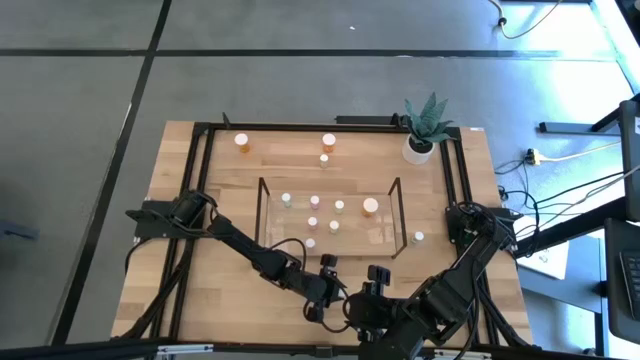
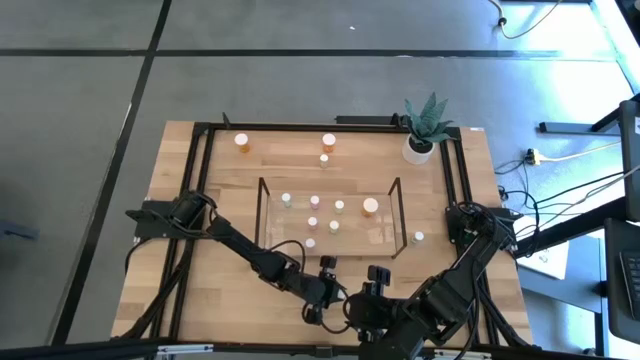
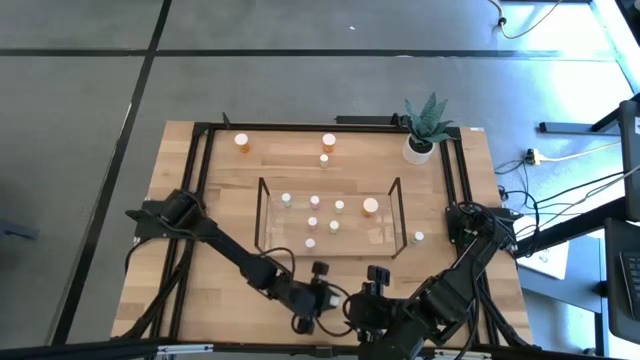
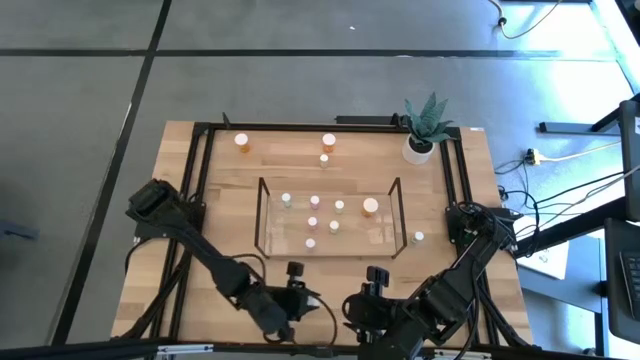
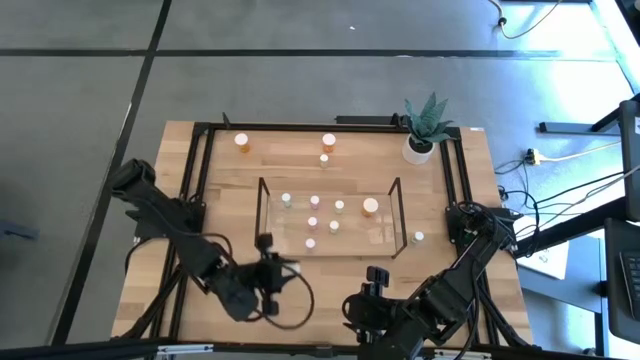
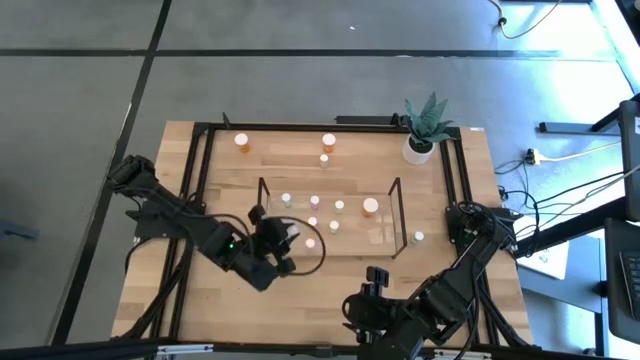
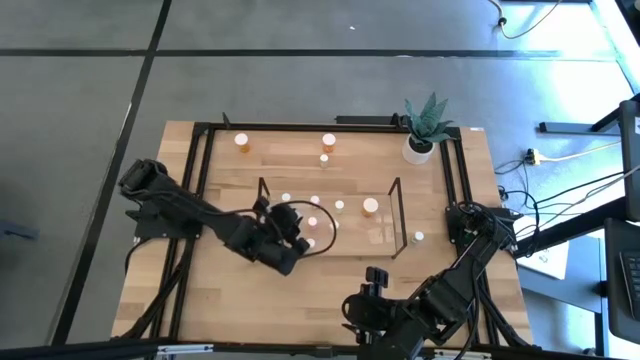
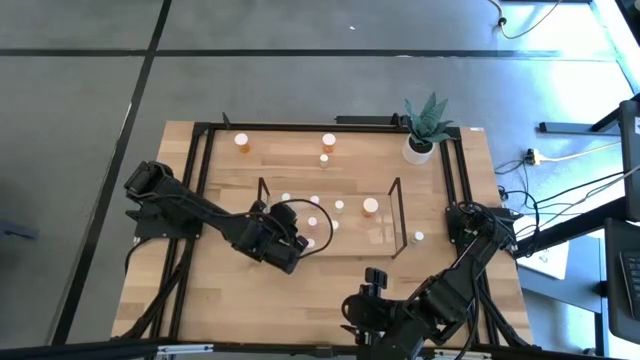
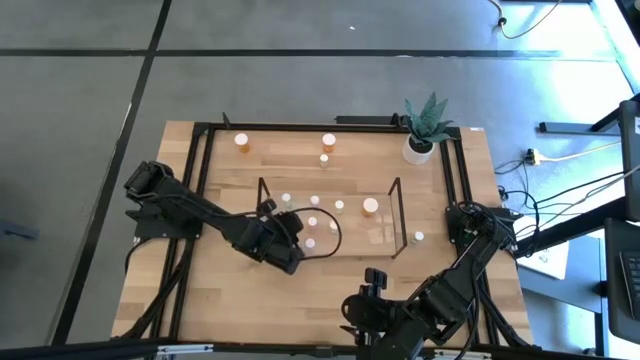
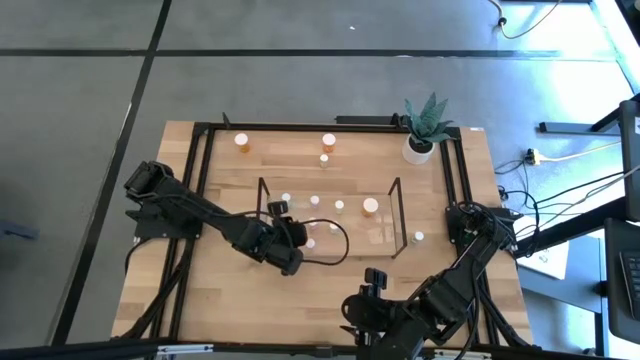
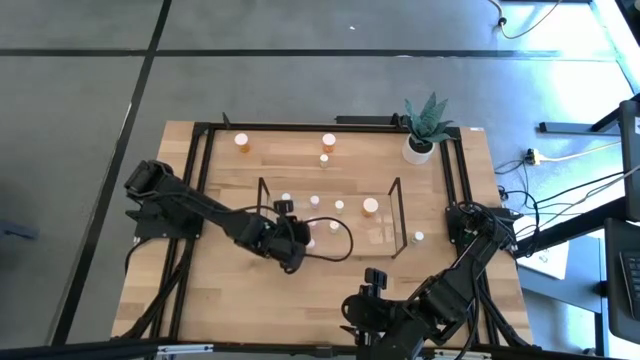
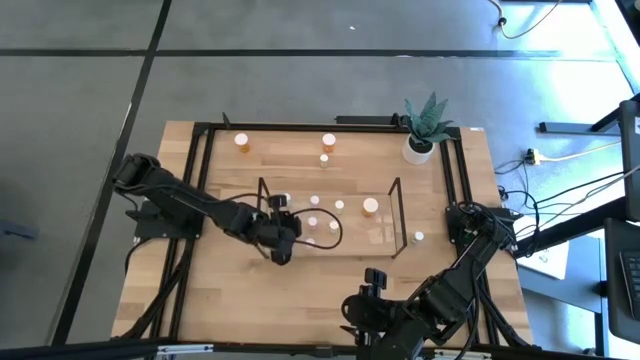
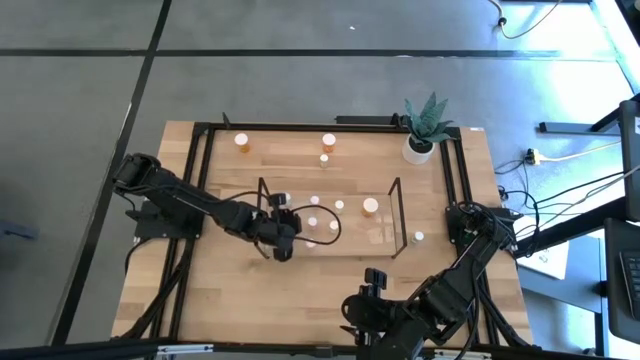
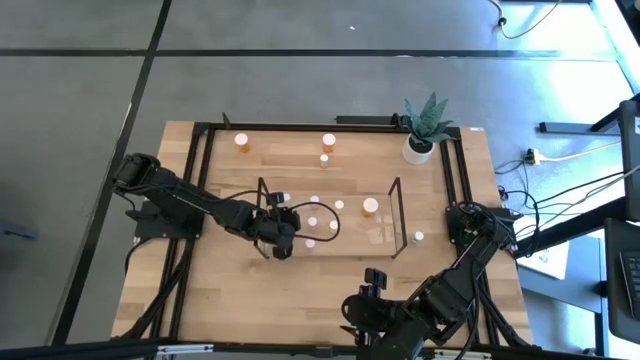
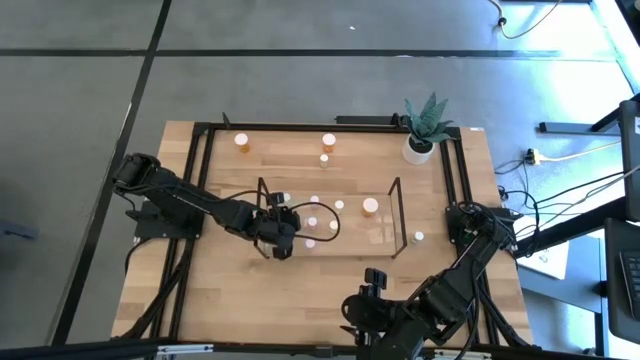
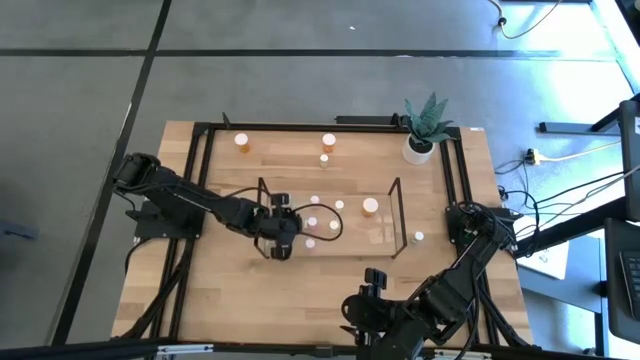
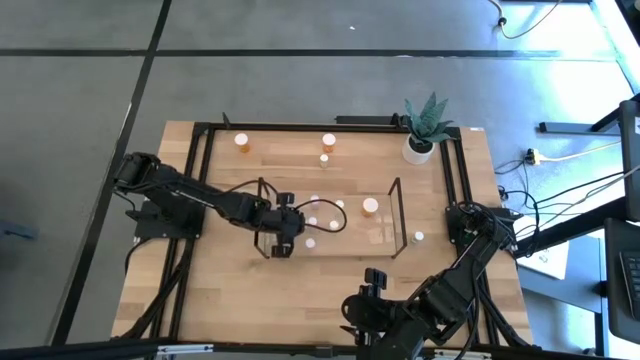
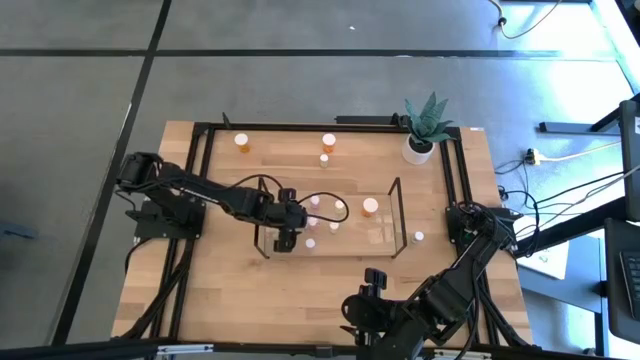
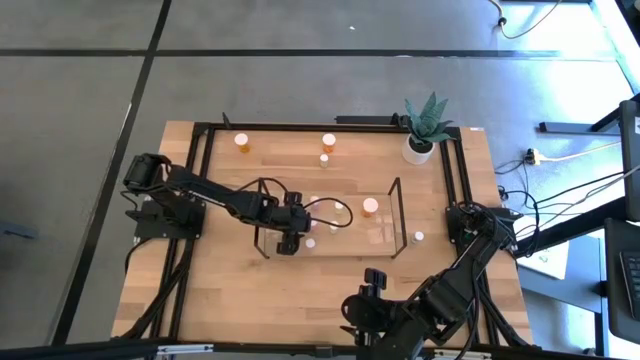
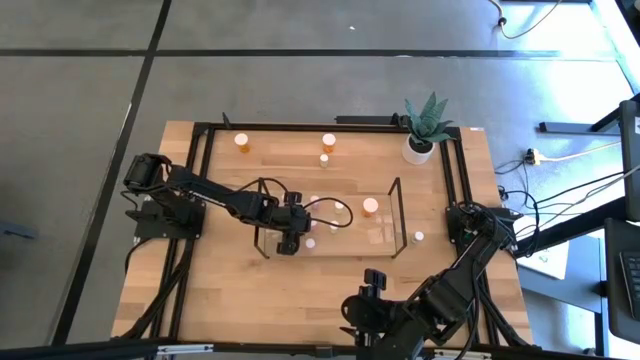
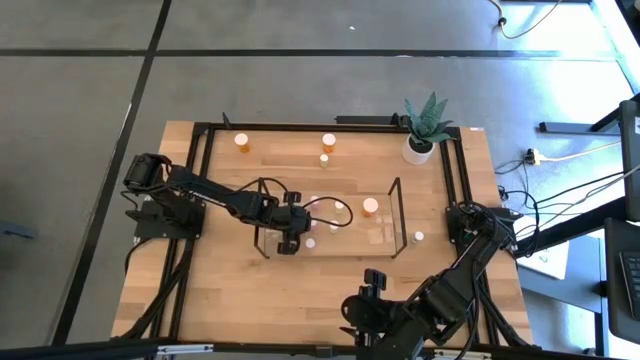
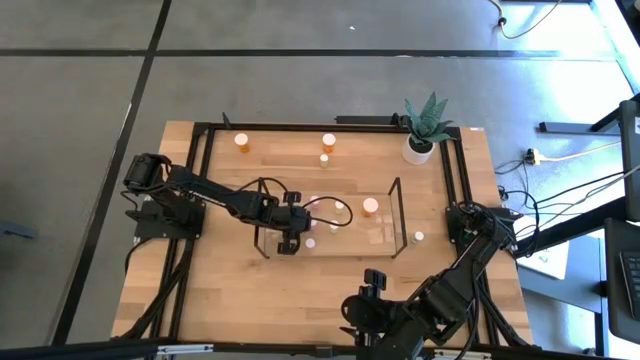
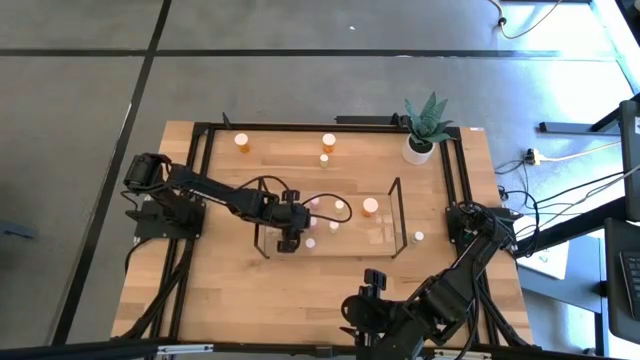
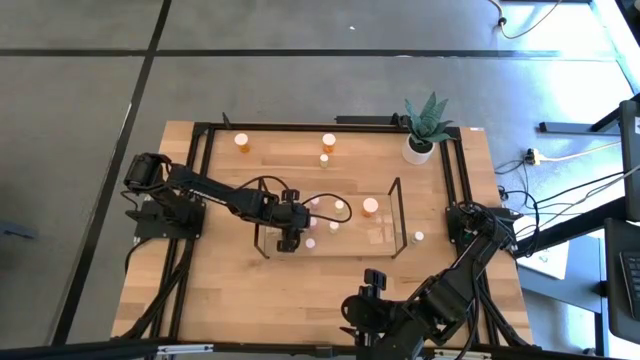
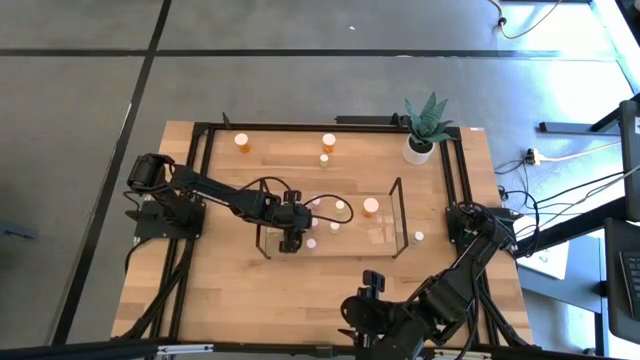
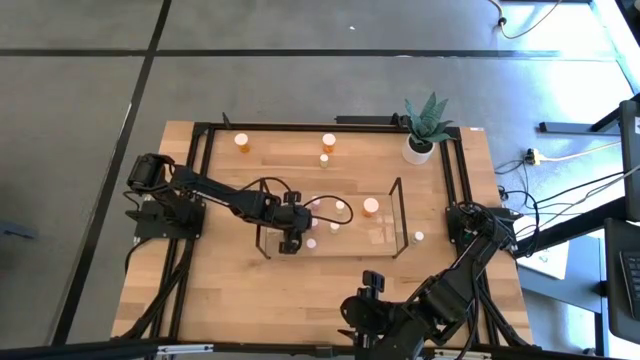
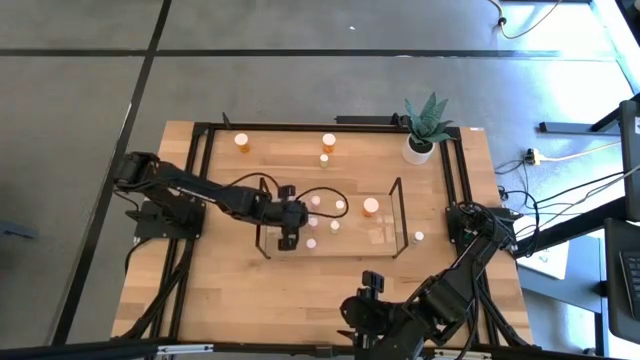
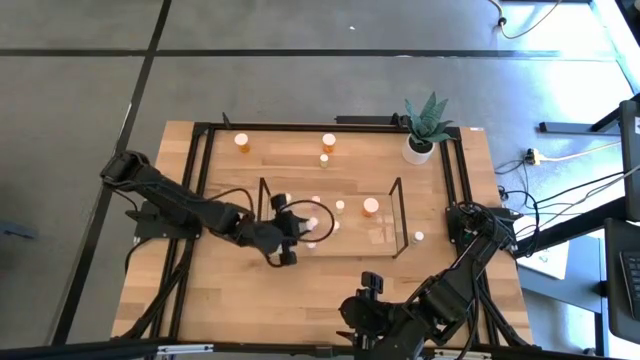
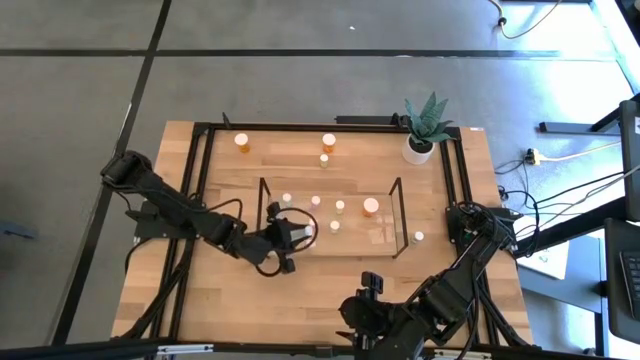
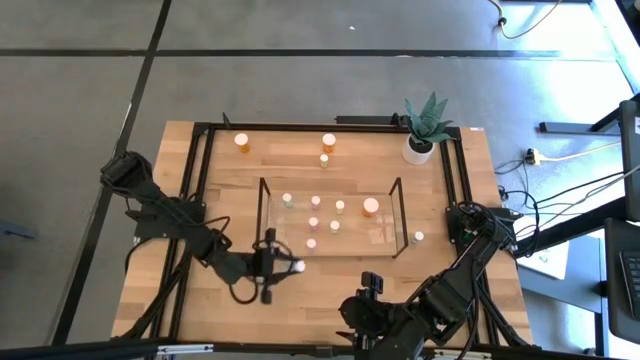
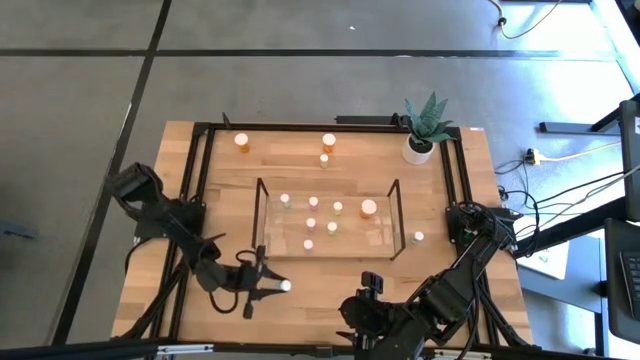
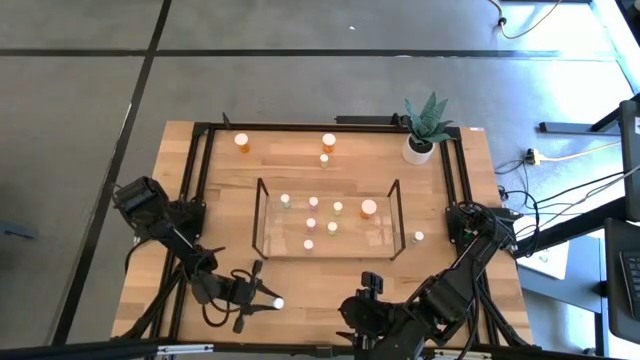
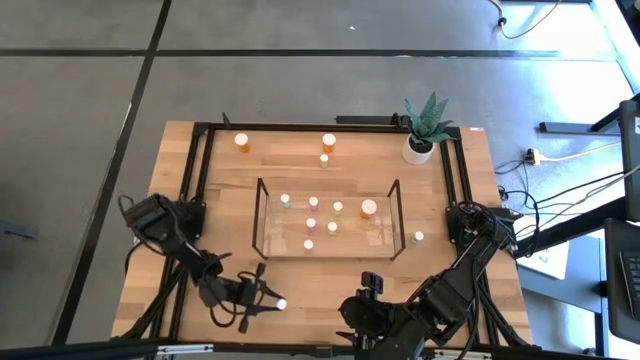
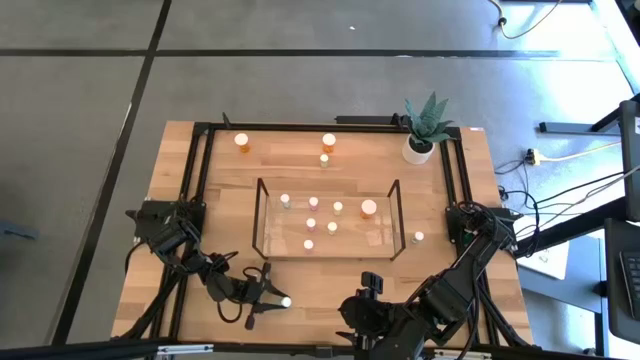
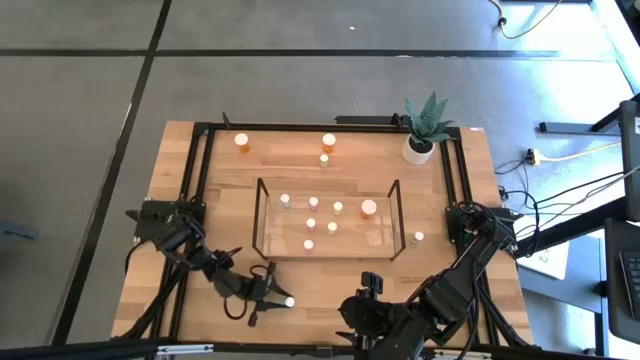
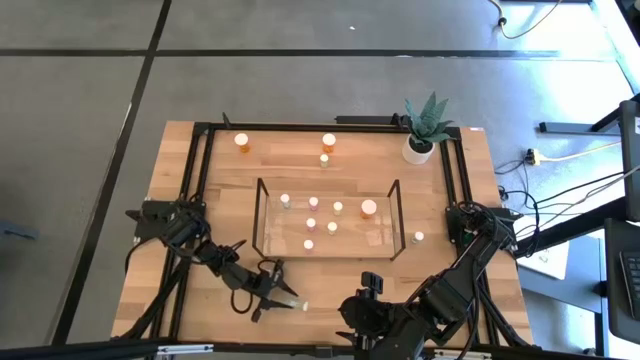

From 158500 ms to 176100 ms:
Task: Pick and place medicine bottles onto shelf by color
Put the bottom blue pill bottle on the shelf aligned with the other blue pill bottle

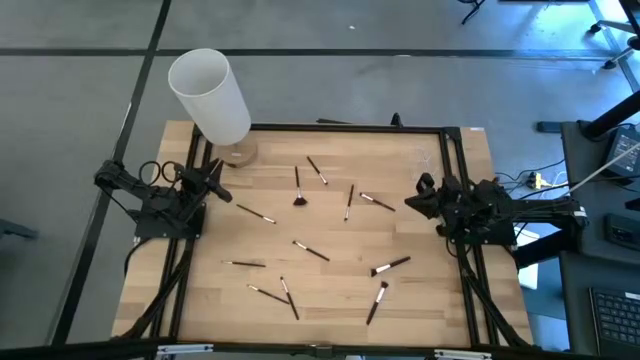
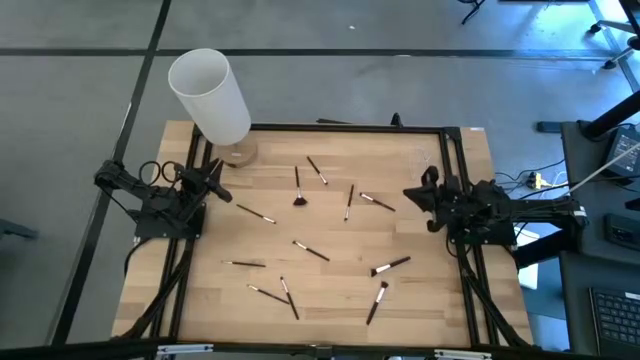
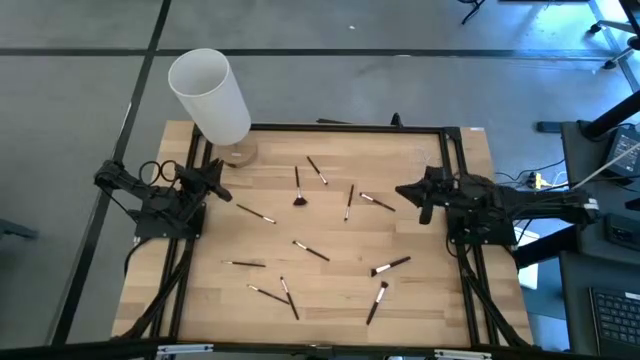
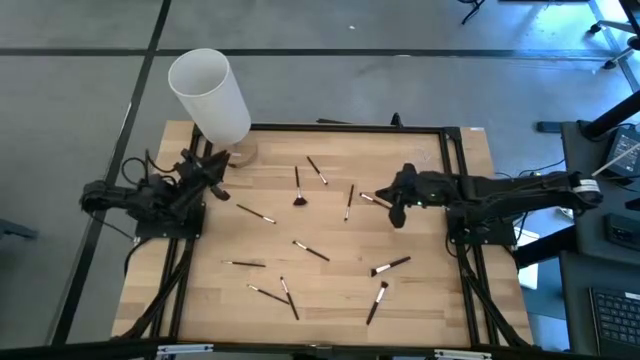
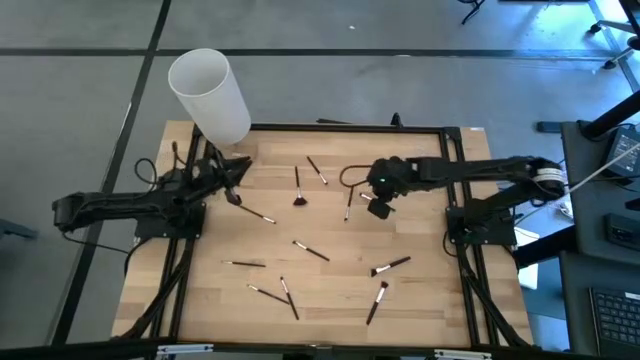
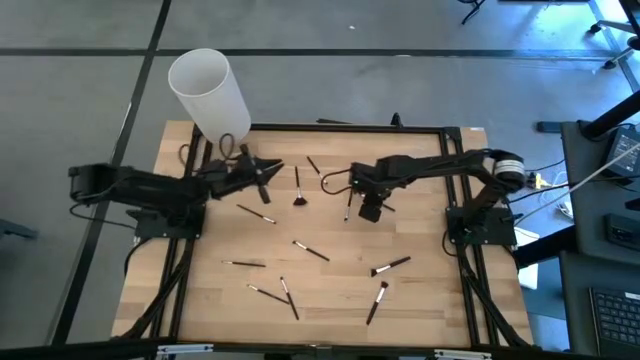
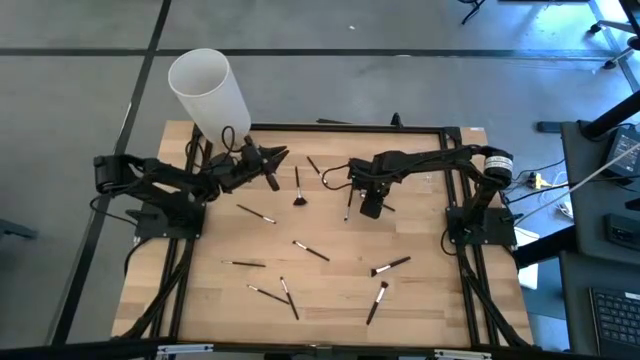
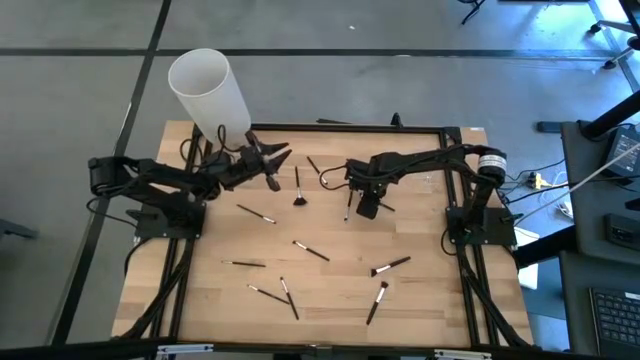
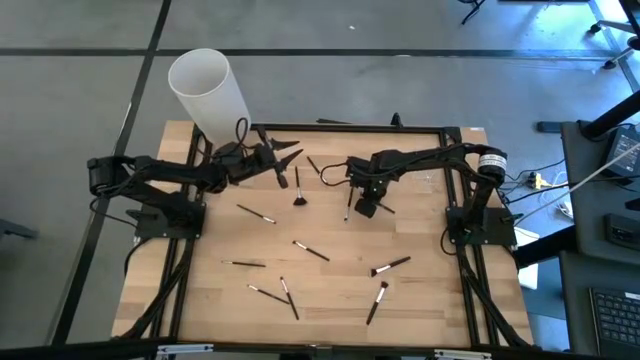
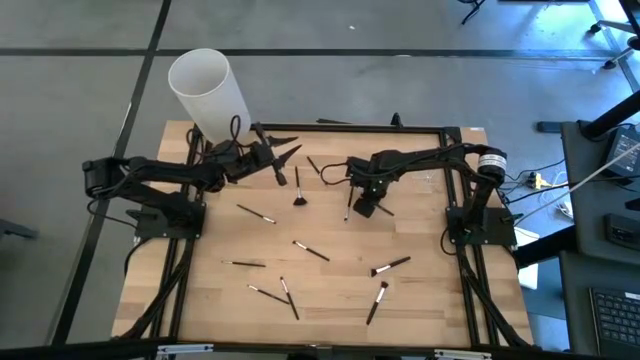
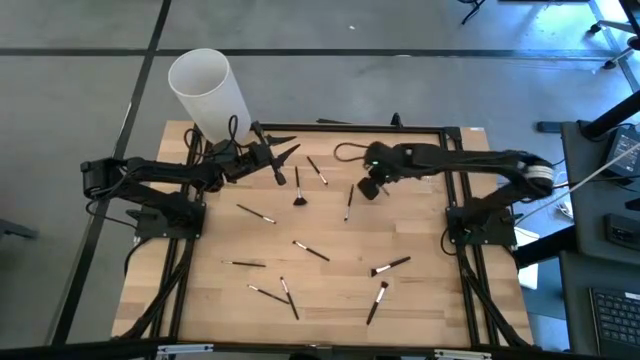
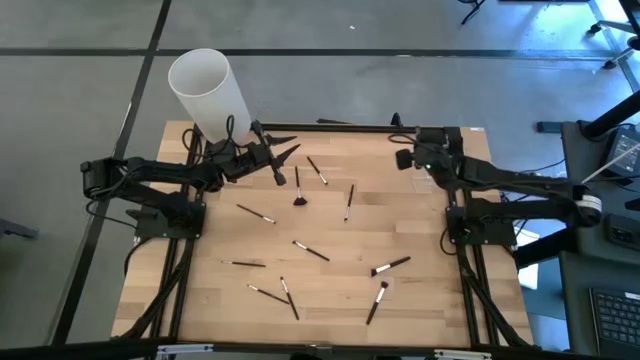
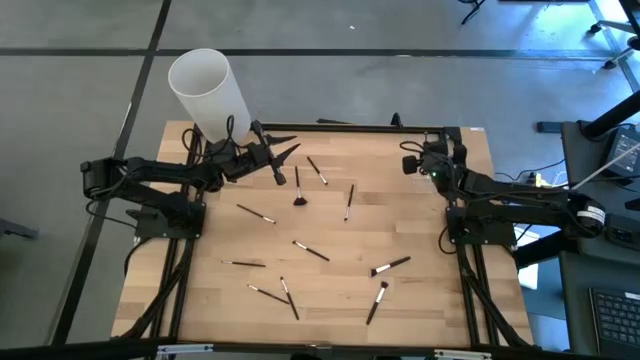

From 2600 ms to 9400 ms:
Task: Sort items
Put the foundation brush into the middle section of the transparent organizer
